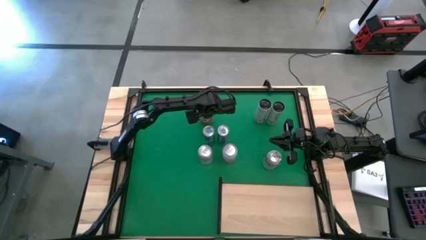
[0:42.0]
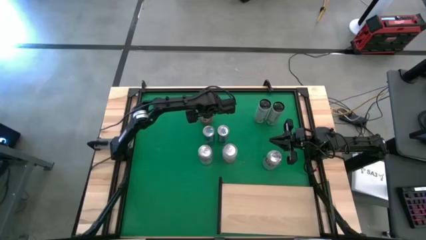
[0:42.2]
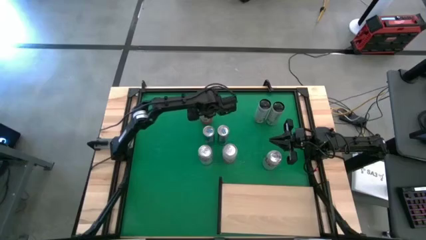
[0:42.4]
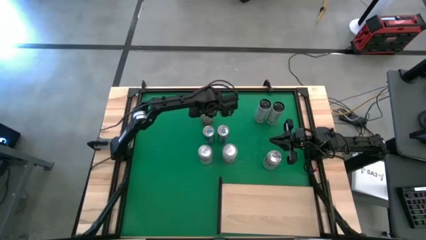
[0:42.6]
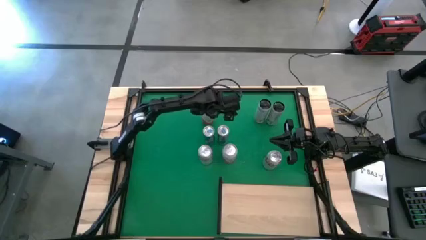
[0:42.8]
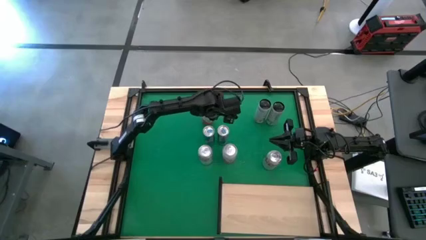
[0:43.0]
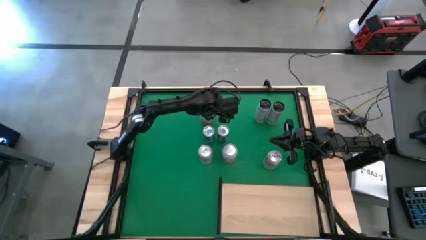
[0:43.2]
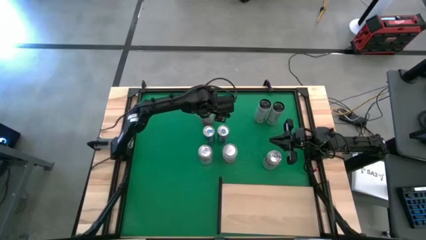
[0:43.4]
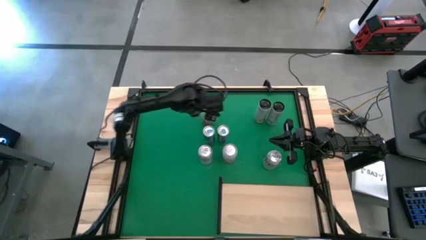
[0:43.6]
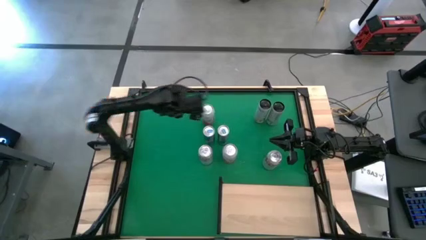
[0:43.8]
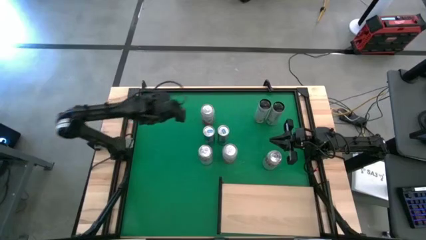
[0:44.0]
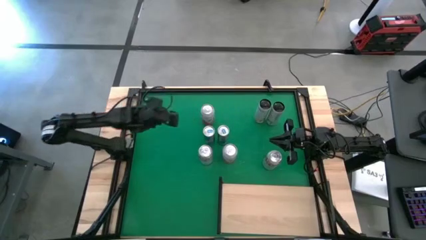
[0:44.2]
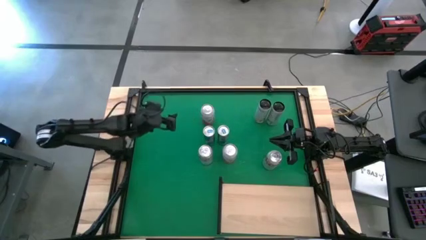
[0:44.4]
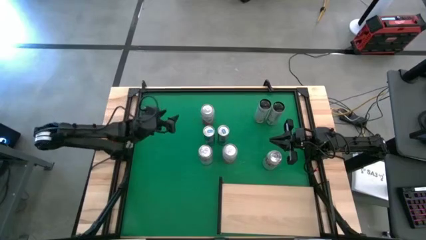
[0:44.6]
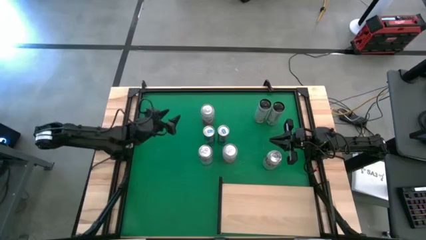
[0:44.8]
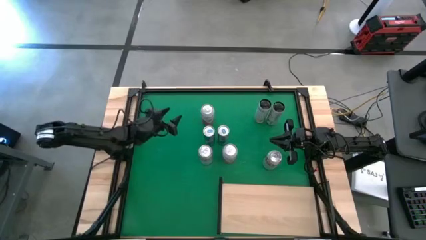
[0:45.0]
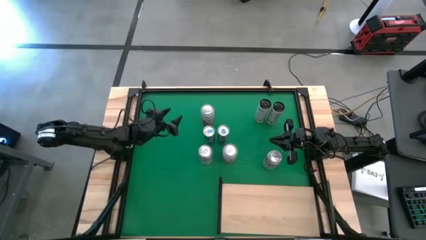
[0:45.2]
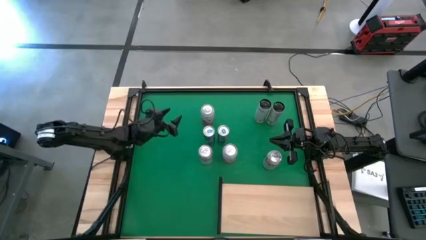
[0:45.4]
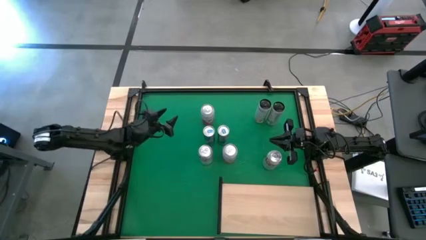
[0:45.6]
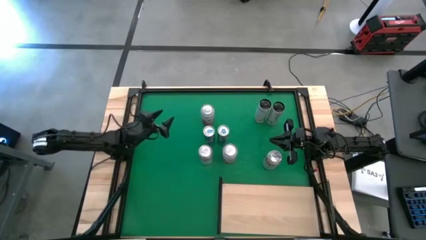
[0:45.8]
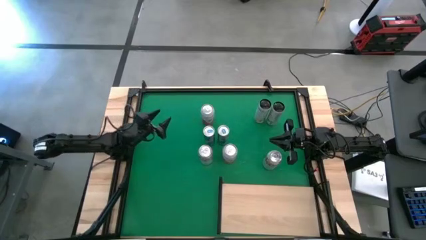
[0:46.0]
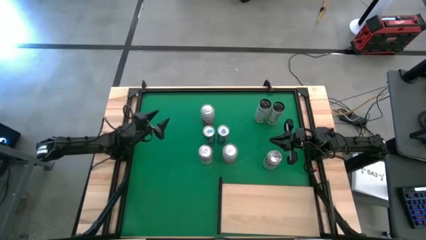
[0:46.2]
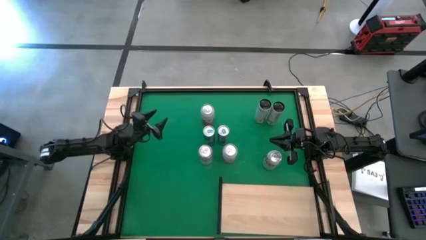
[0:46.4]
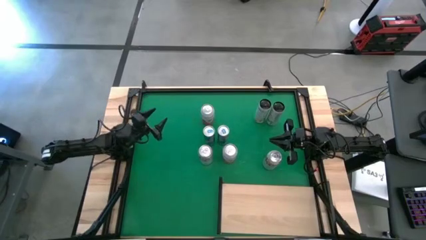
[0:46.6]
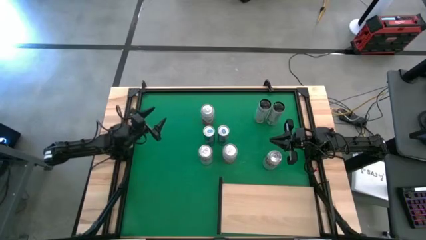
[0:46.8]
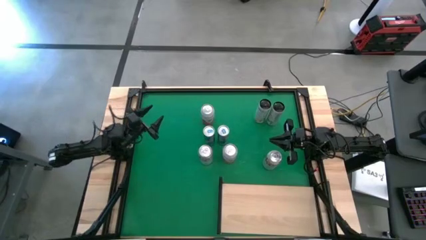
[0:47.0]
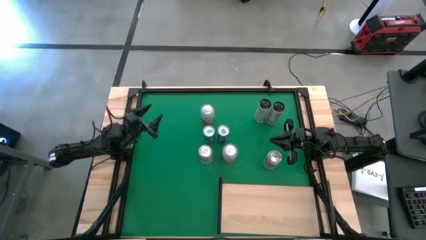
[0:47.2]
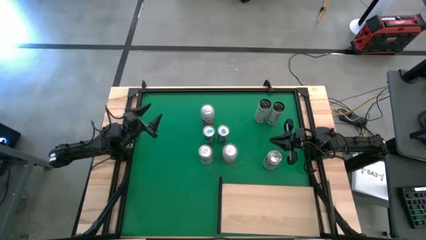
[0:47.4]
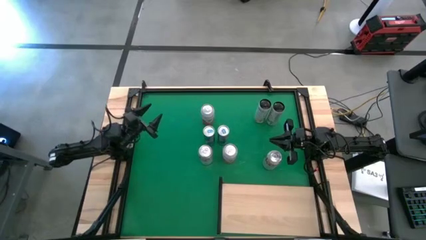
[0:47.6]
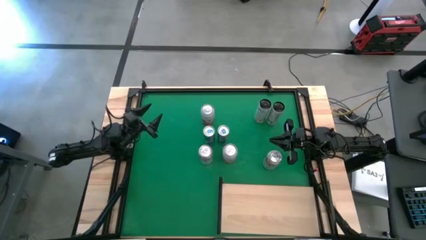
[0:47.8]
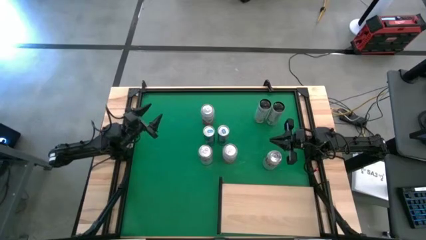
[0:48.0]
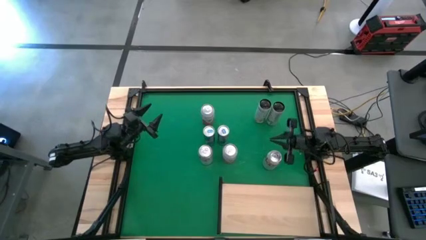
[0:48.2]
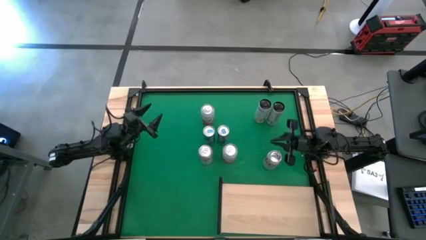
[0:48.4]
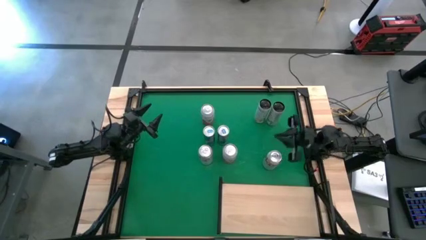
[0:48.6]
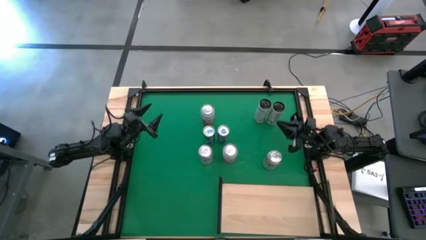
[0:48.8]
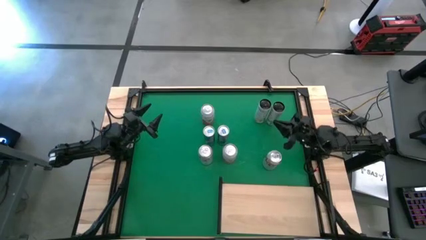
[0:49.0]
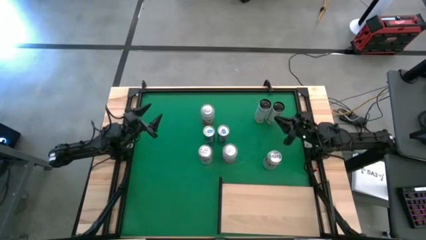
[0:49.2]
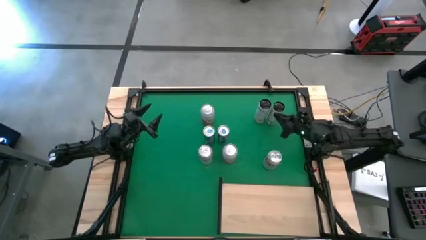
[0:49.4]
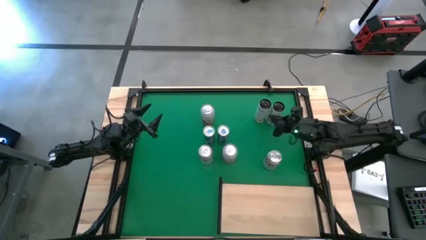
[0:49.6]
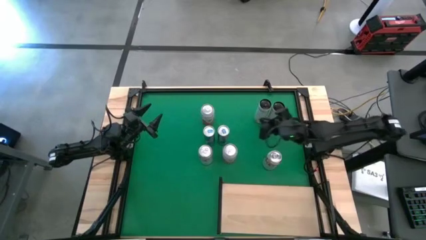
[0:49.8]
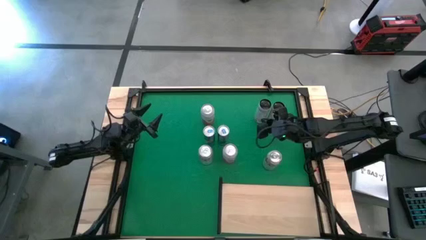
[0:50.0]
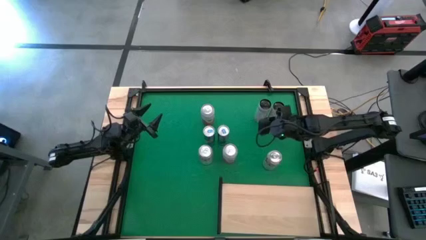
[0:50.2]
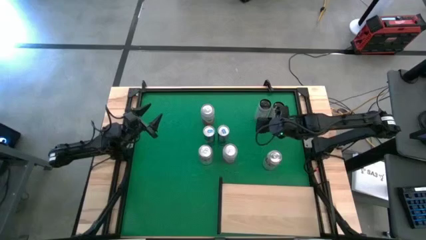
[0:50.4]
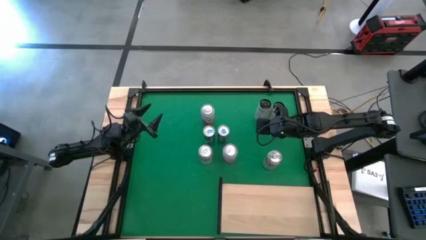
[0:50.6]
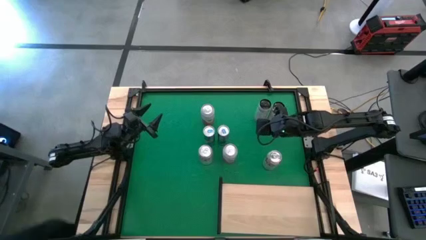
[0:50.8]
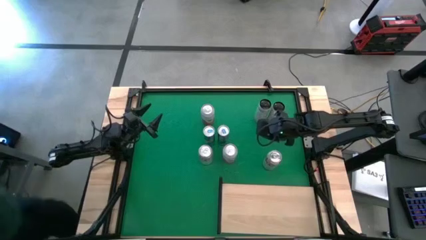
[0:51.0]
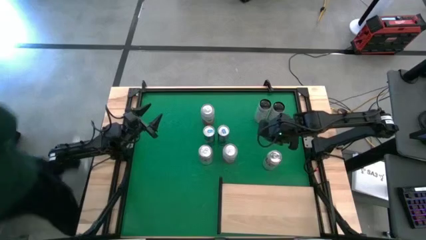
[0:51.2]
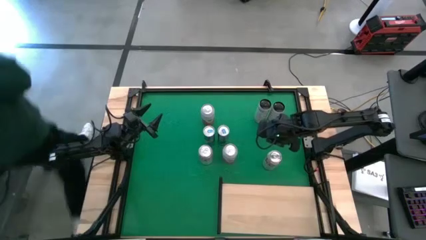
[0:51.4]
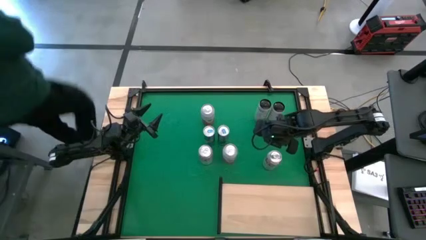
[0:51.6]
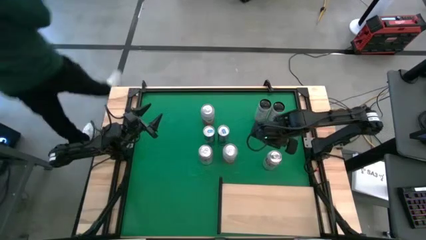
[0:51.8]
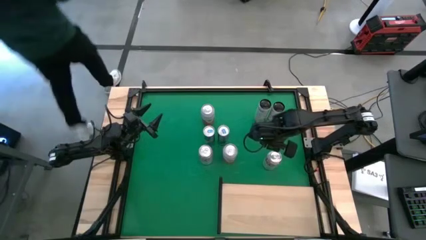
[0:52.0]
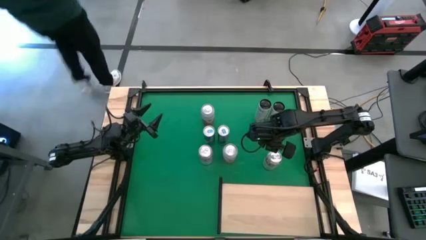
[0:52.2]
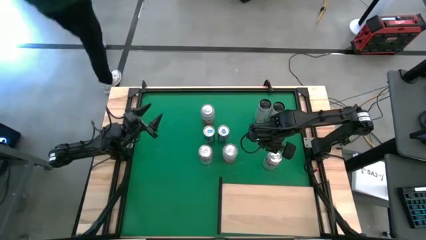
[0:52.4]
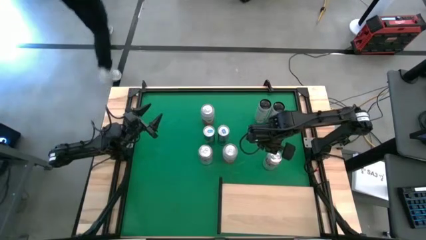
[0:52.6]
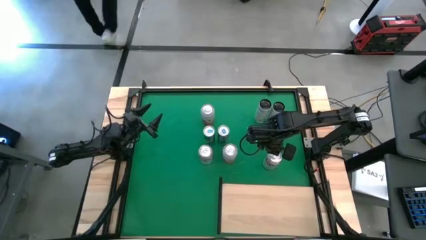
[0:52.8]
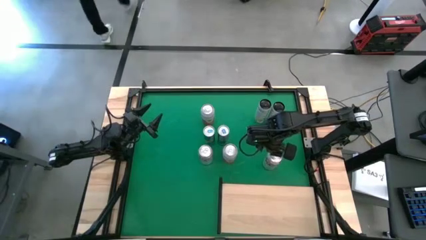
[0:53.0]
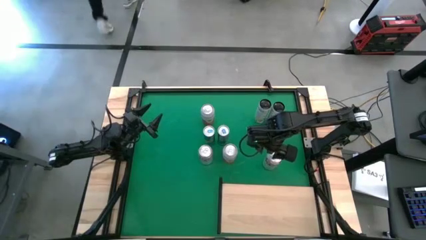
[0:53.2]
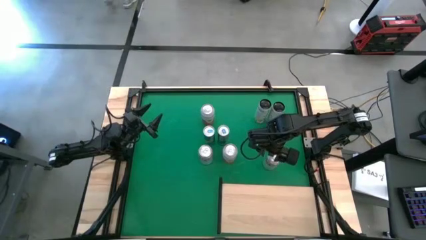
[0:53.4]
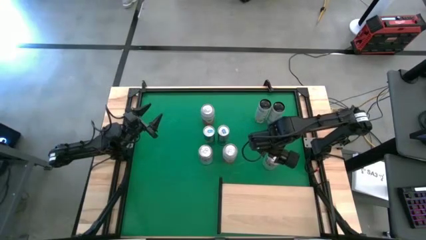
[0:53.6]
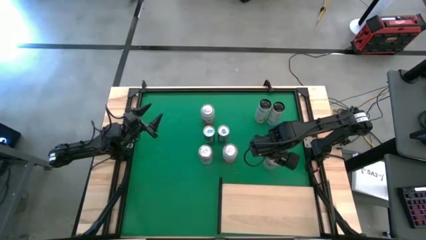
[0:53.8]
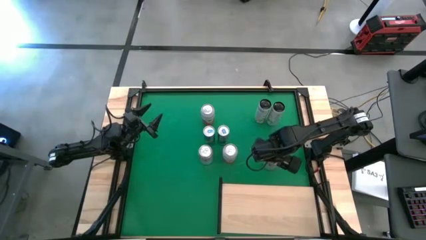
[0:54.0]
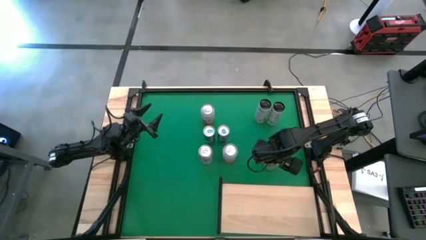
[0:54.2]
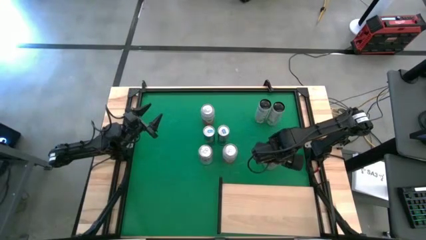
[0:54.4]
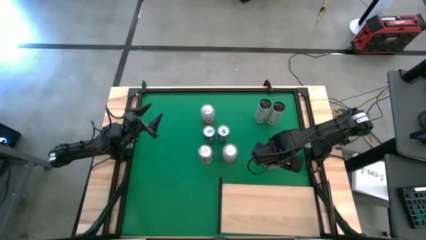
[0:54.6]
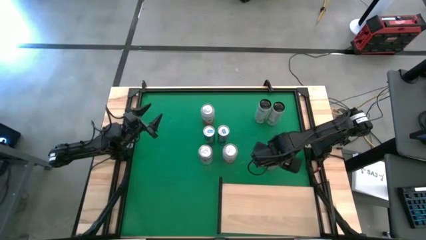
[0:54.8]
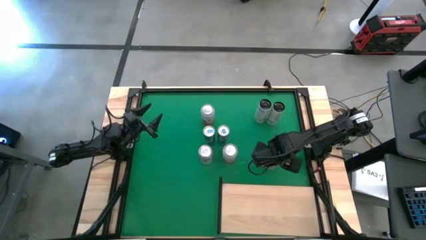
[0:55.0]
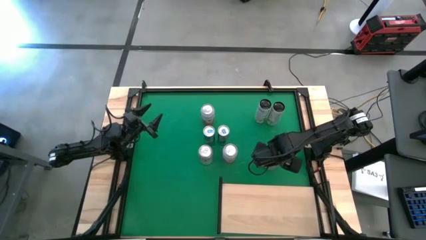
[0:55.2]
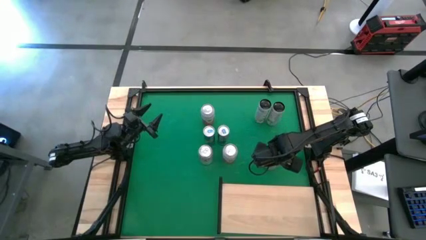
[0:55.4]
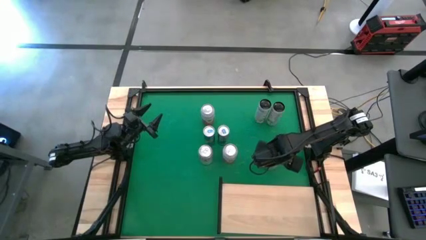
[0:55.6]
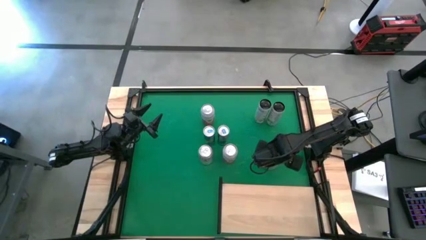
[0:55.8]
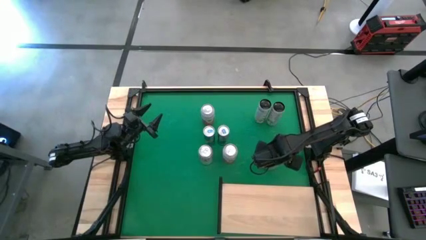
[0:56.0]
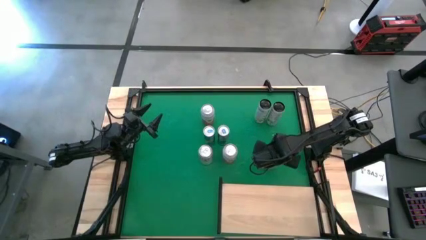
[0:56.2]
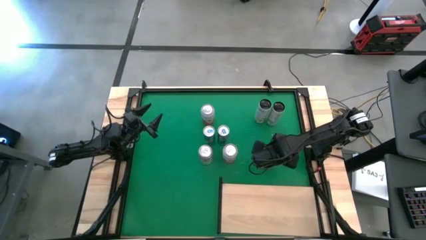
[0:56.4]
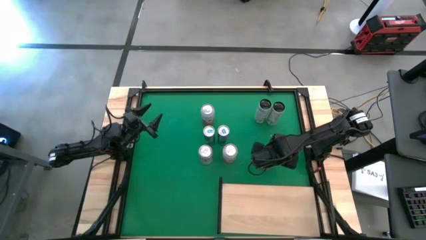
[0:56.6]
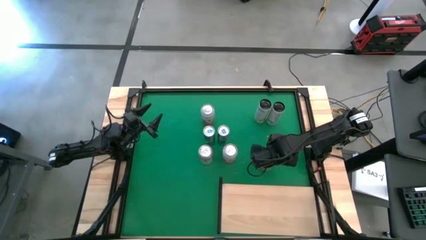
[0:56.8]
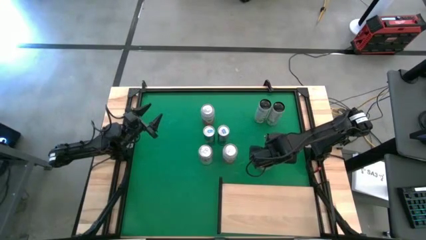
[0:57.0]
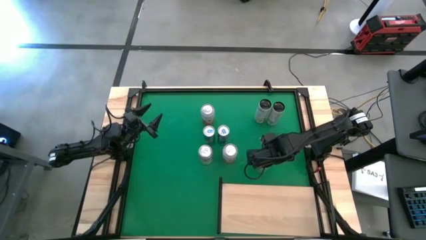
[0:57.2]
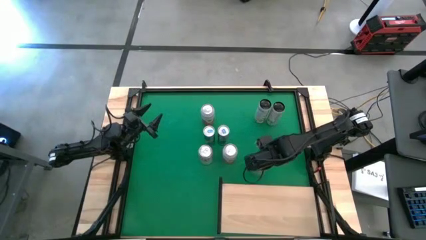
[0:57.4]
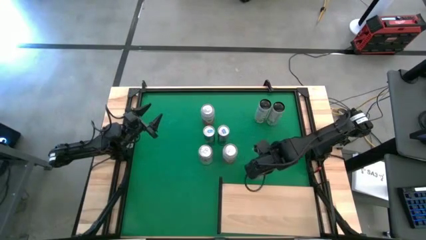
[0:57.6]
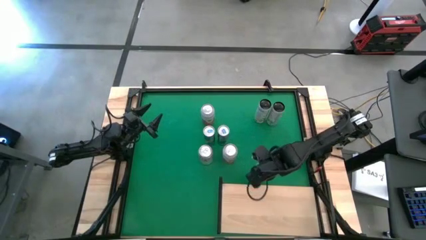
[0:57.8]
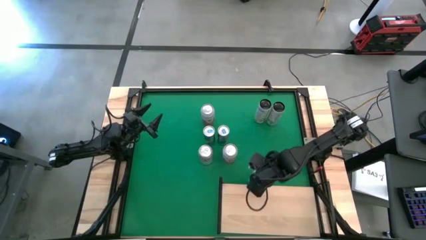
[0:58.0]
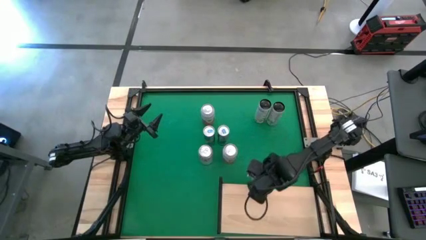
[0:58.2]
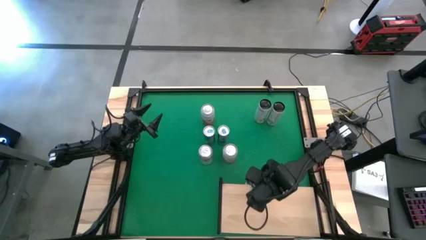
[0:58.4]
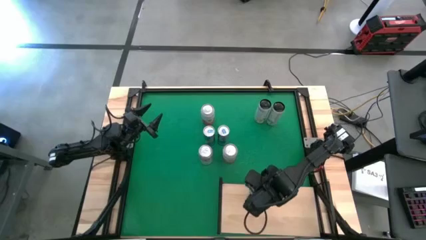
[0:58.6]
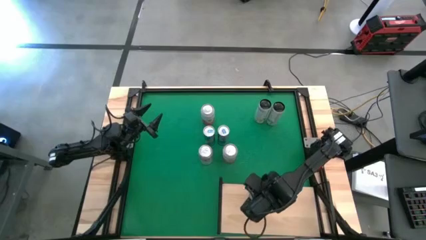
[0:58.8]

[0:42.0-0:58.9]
Task: Place canned beverage on shelf
Put the right red-silver soda can on the shelf
